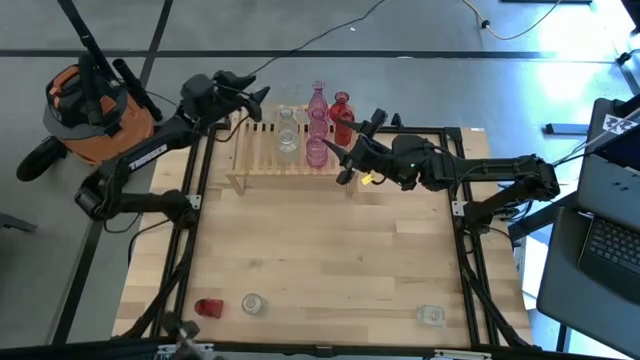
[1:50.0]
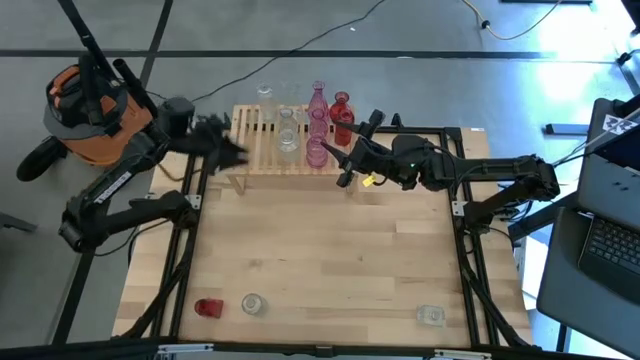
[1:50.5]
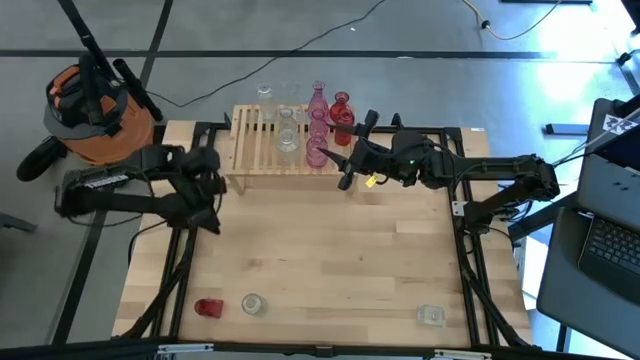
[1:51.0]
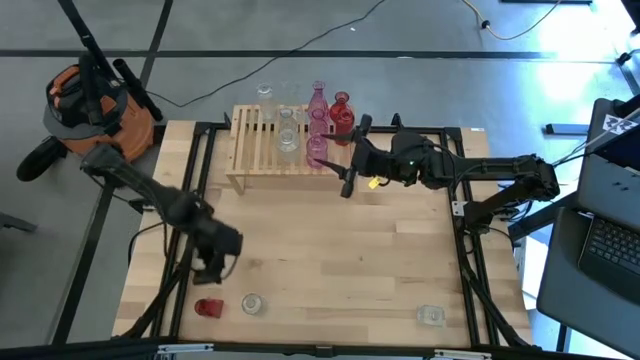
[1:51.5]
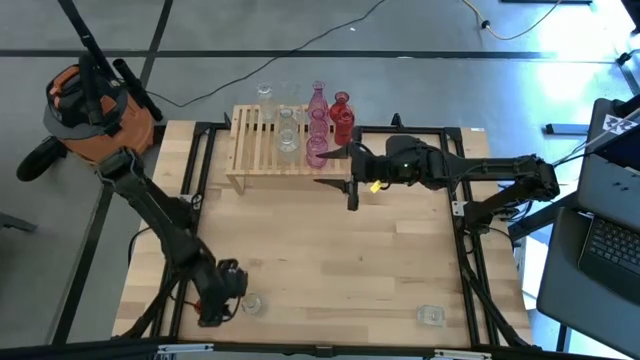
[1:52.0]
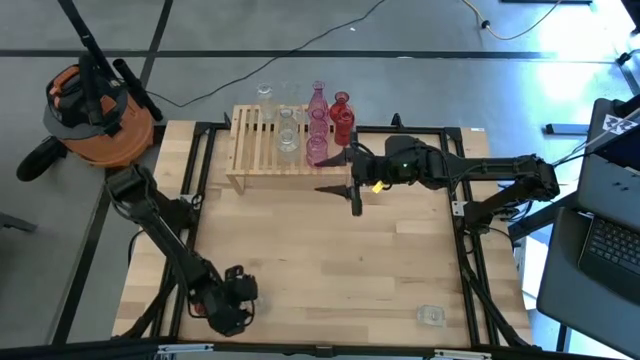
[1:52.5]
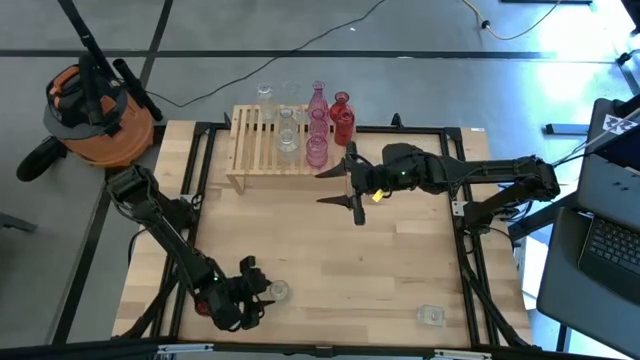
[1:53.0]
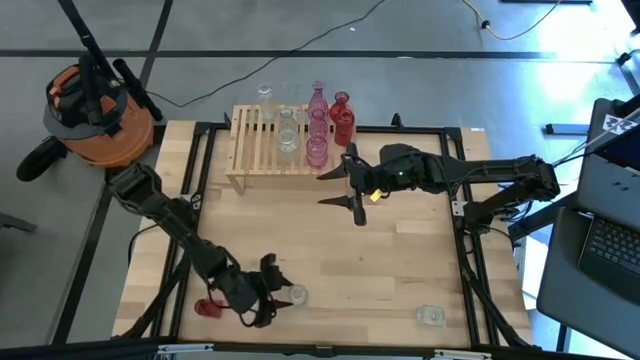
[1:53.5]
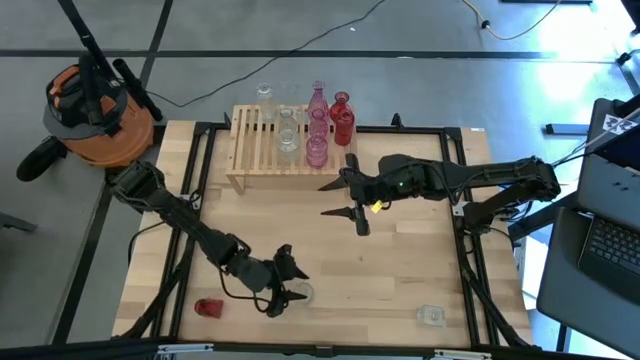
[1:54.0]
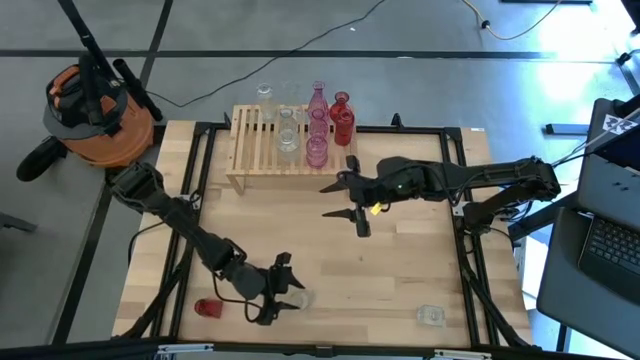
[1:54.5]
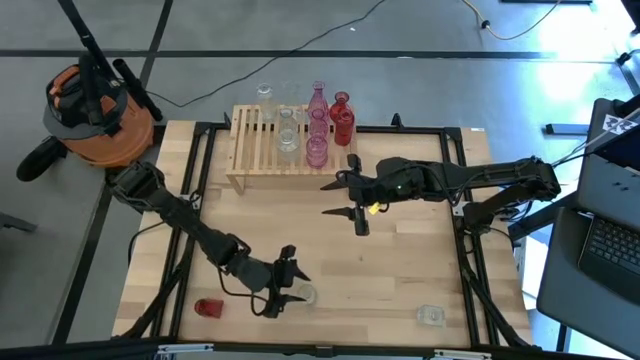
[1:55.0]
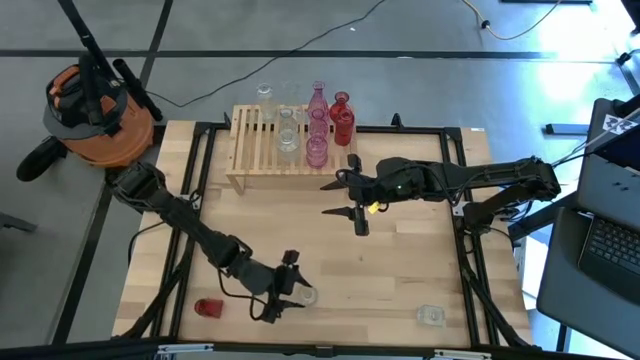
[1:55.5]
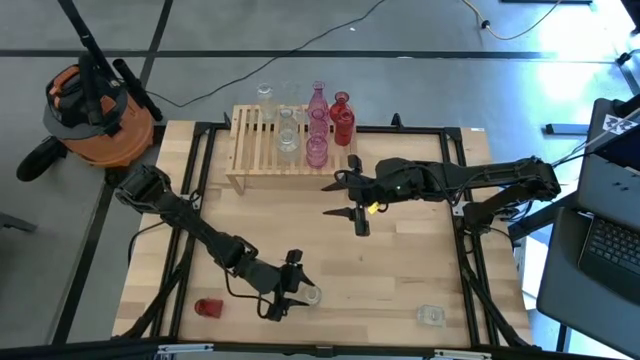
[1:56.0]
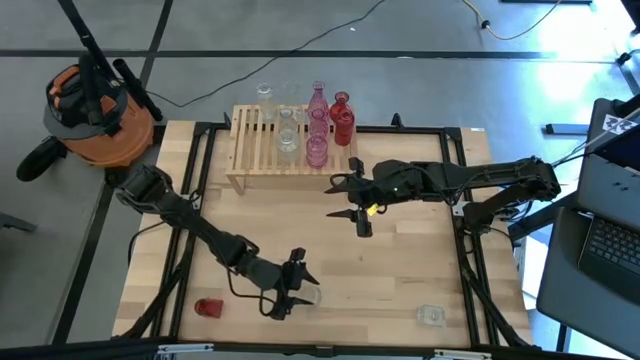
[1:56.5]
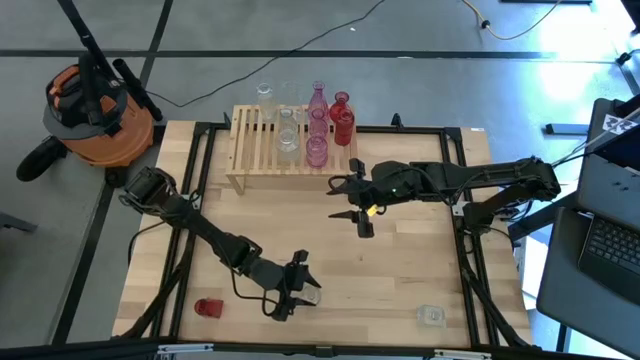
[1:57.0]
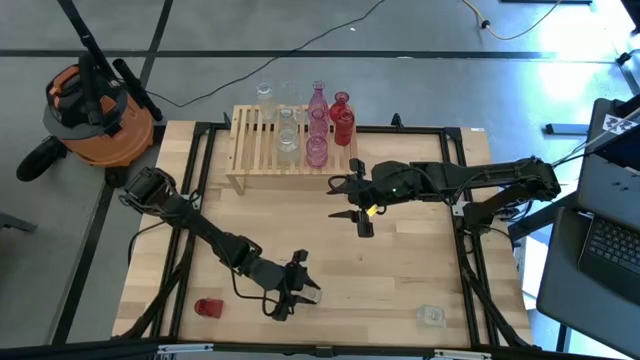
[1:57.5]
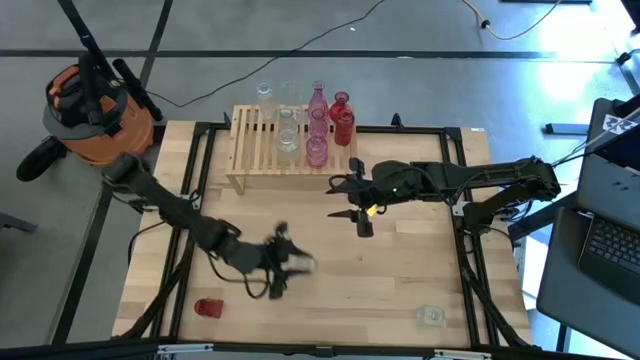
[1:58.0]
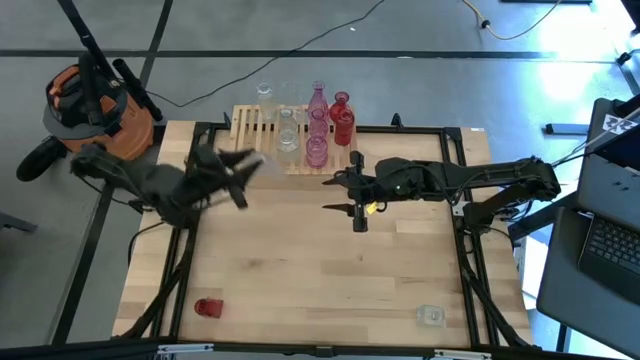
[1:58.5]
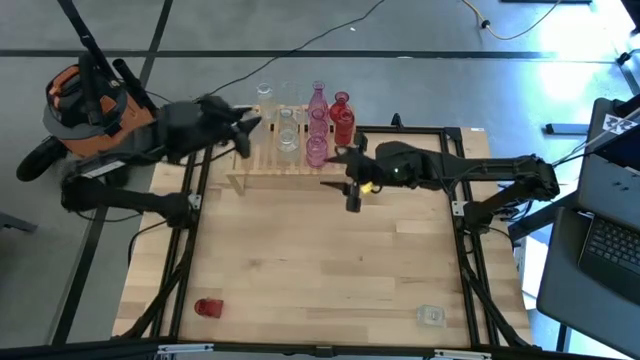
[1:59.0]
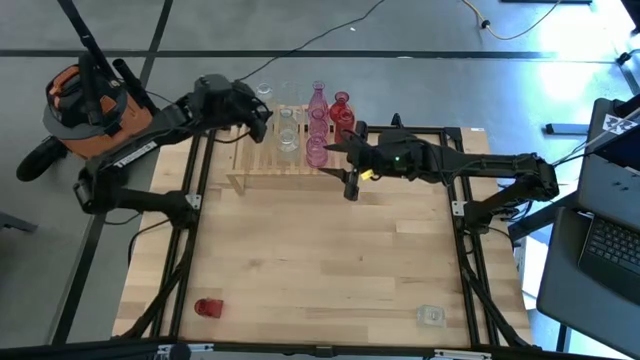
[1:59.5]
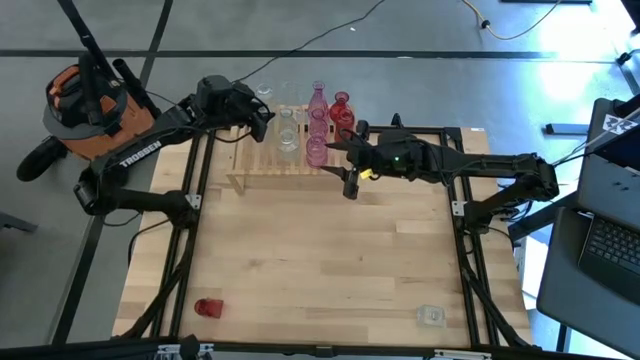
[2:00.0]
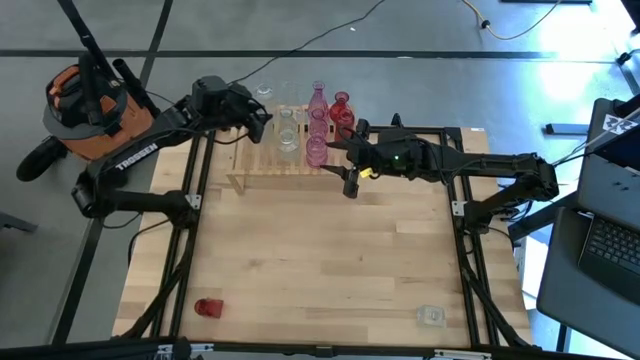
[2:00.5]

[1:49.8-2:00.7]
Task: sort vases onto shelf
Put the transparent vase on the shelf aligned with the other transparent vase on the left

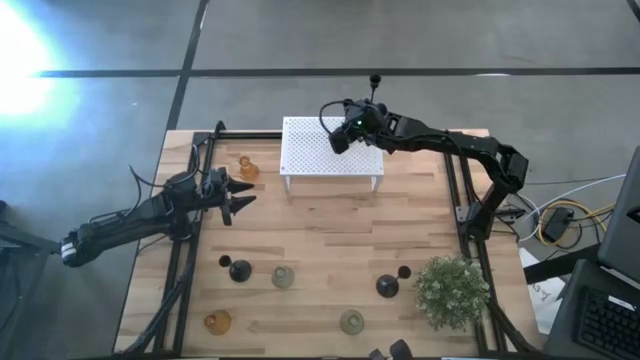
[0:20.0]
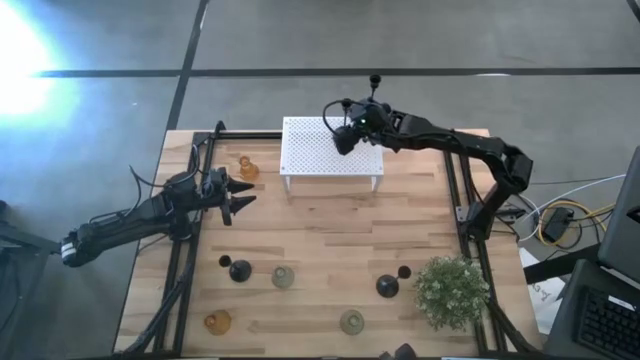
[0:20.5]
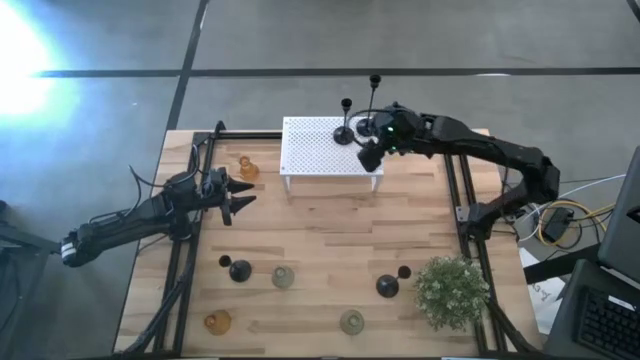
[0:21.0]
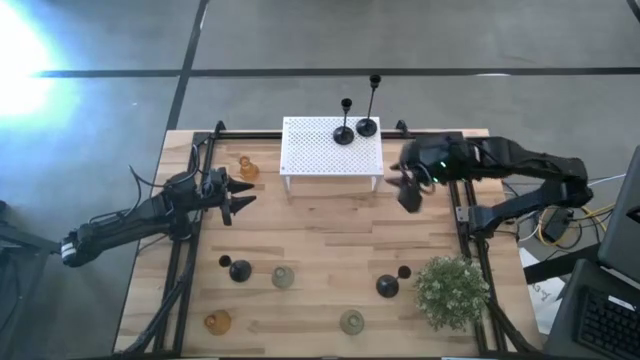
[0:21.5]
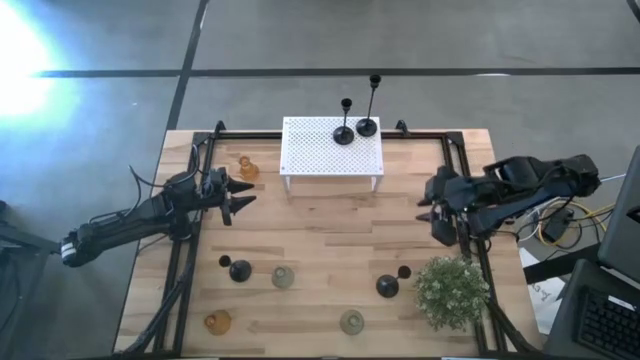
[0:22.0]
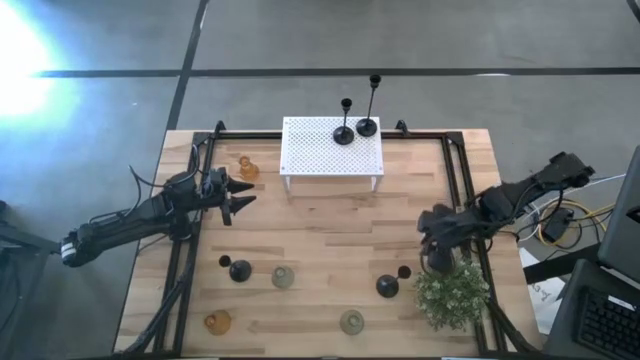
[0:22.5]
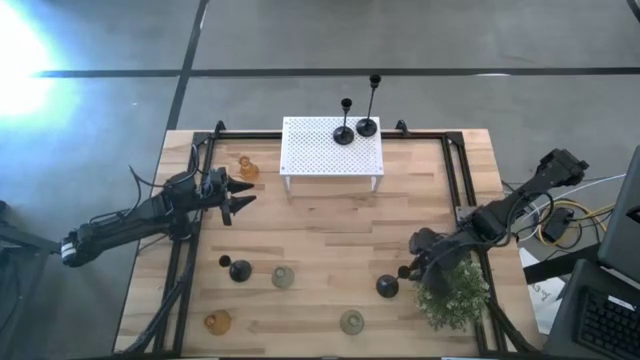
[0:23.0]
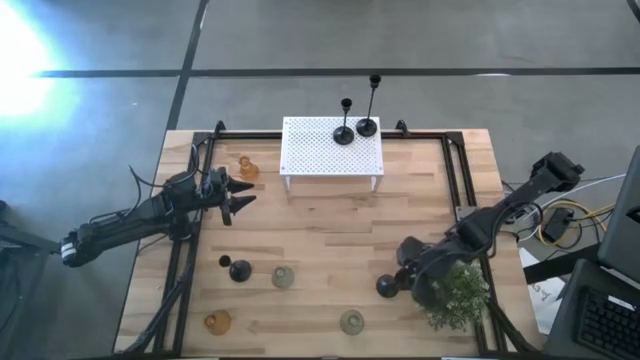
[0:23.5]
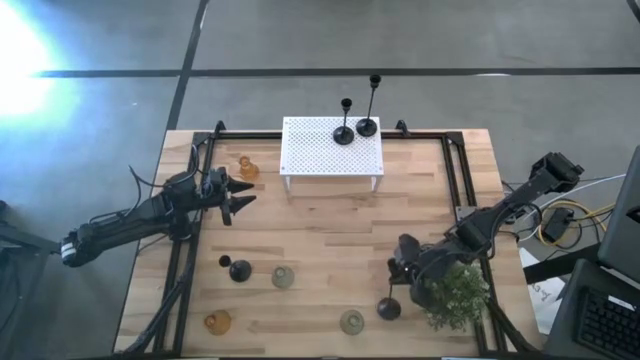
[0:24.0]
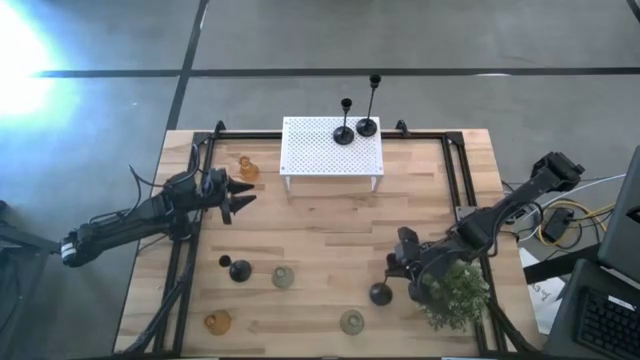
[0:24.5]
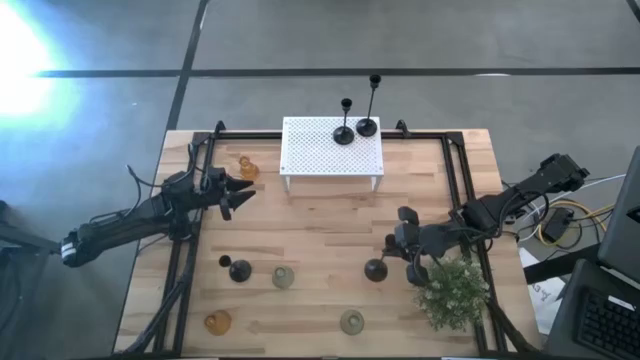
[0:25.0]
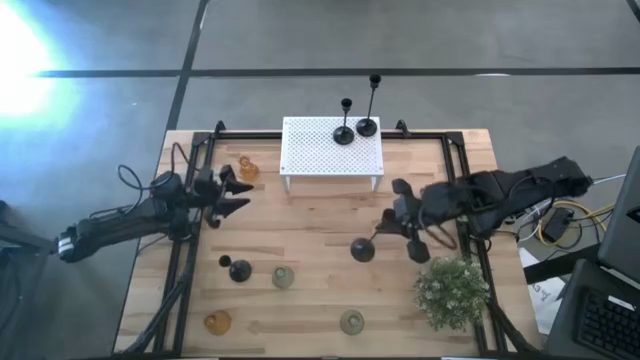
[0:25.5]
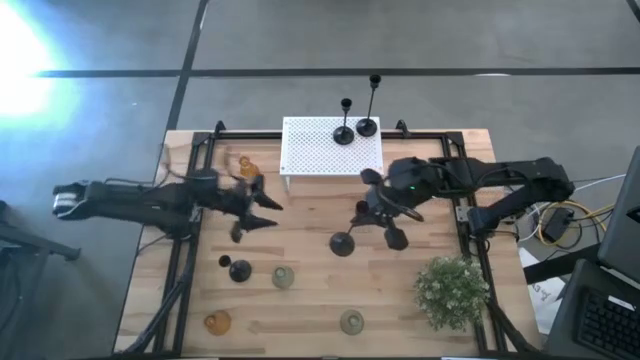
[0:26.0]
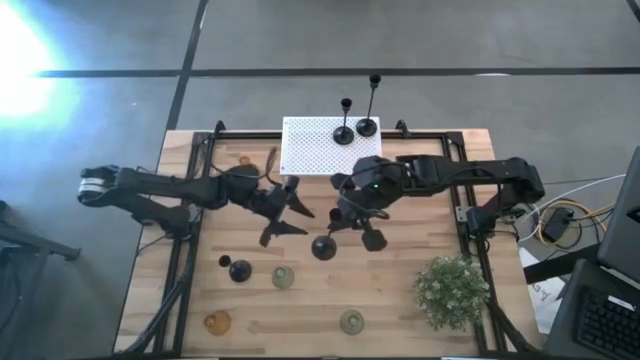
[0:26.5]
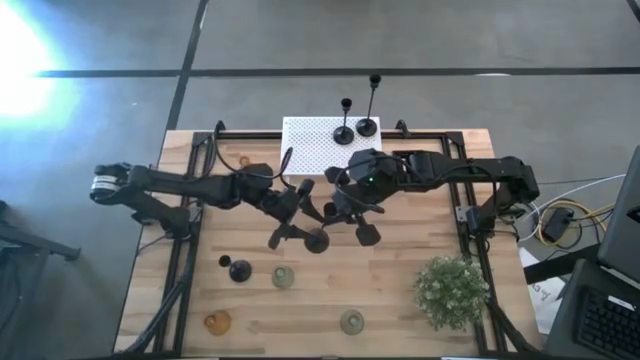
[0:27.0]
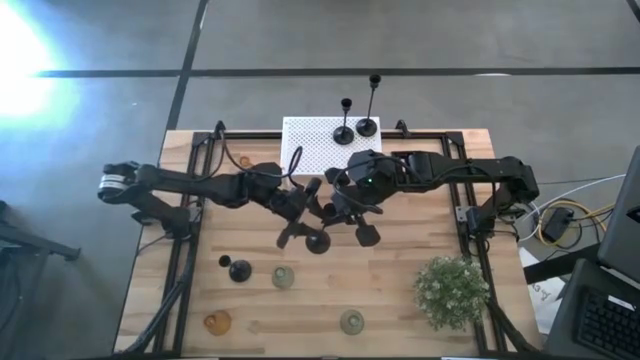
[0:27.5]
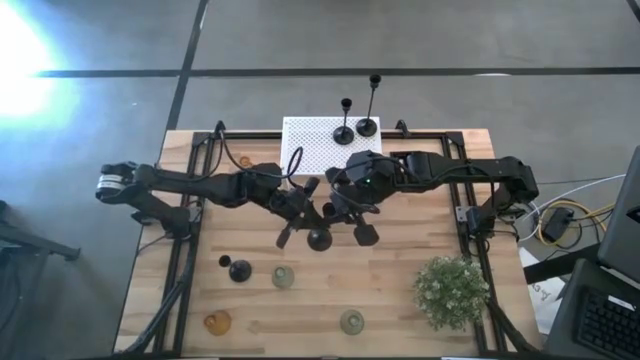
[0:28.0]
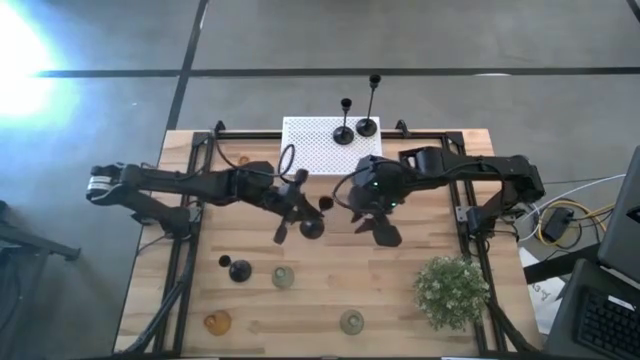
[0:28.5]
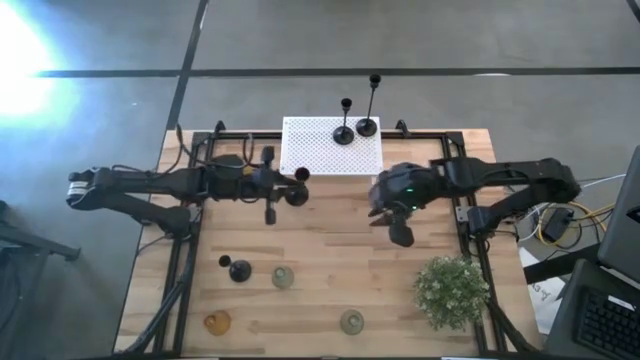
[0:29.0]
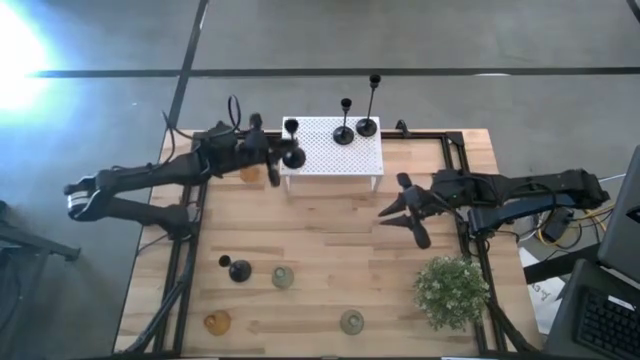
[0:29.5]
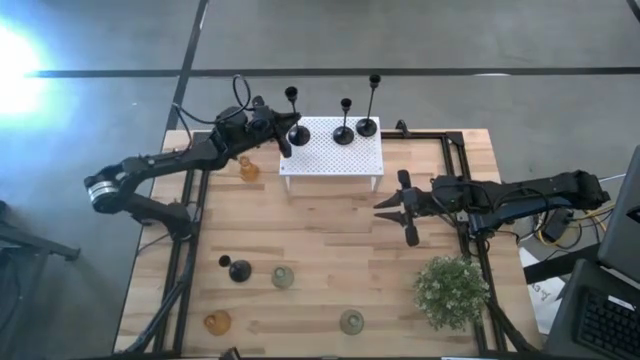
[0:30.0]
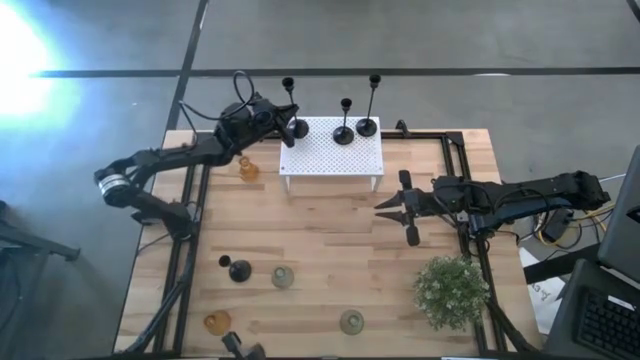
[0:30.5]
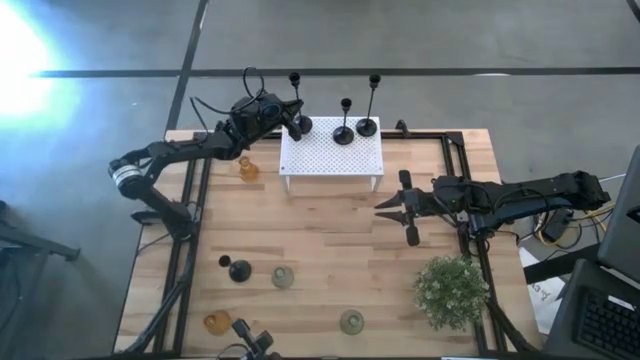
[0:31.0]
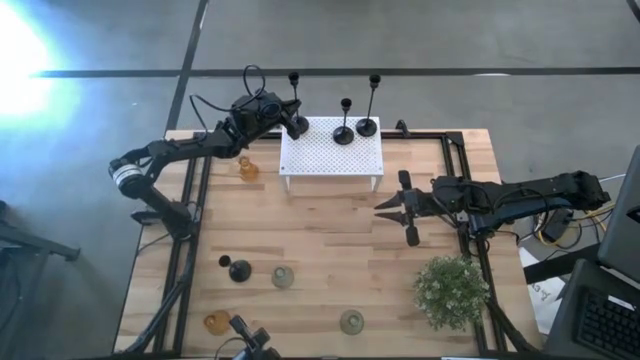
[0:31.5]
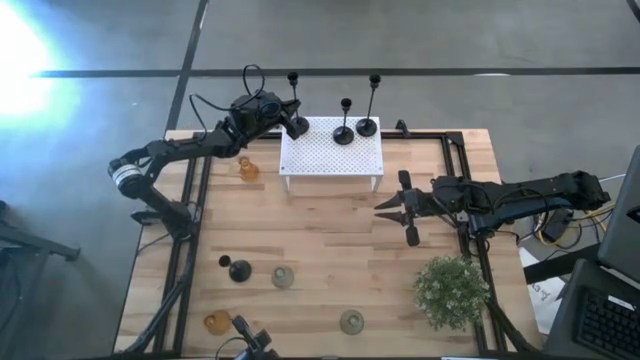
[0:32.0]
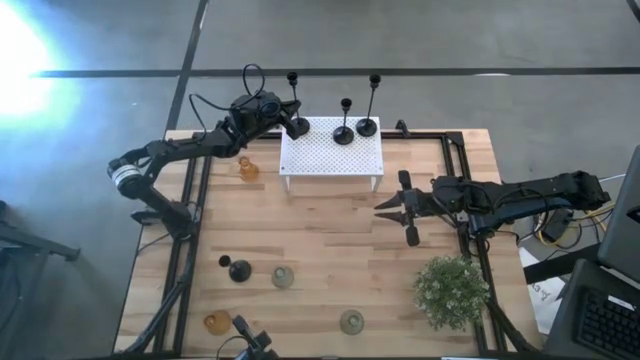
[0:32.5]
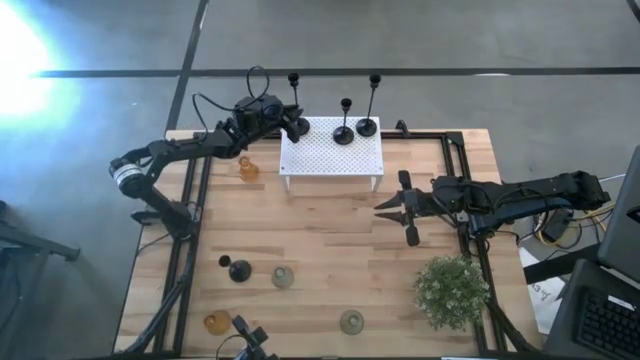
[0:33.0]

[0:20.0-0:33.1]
Task: Pick & Place candle stick holders
Put the black candle holder on the shelf
